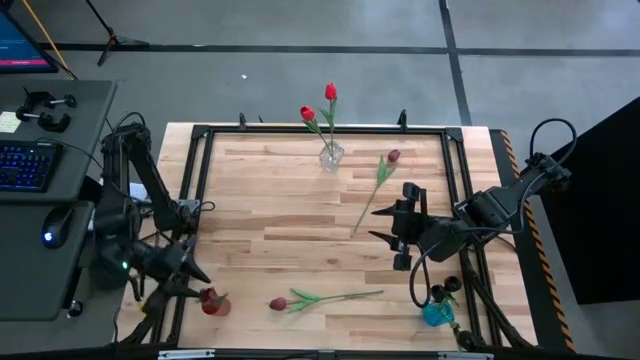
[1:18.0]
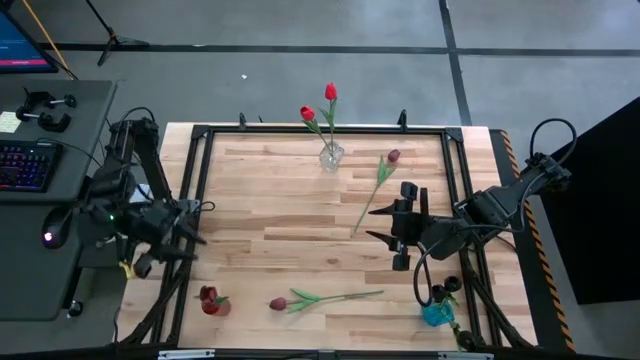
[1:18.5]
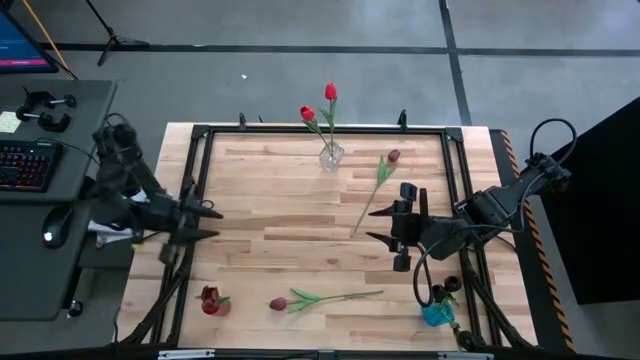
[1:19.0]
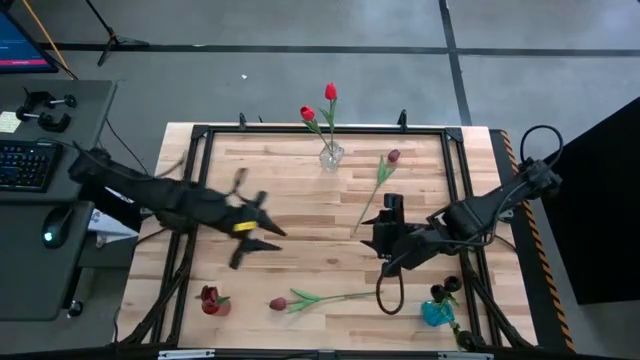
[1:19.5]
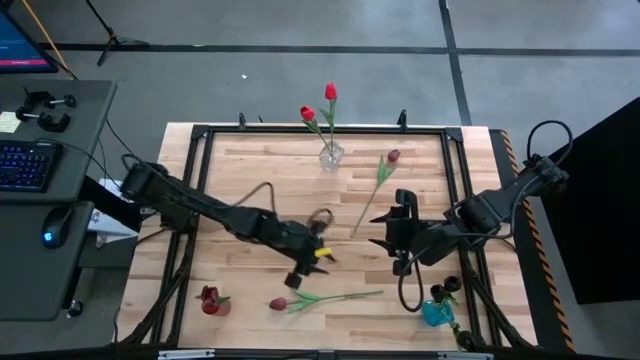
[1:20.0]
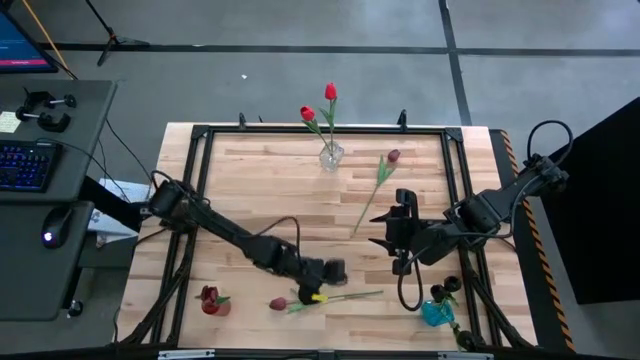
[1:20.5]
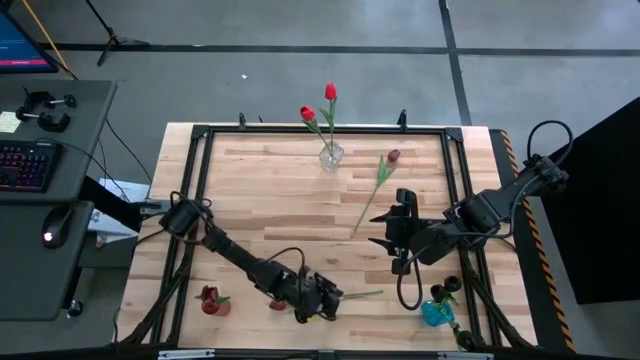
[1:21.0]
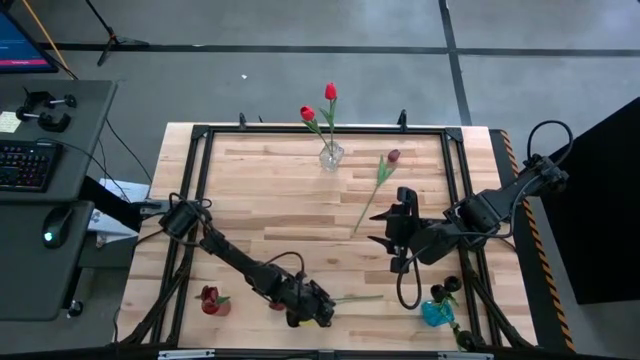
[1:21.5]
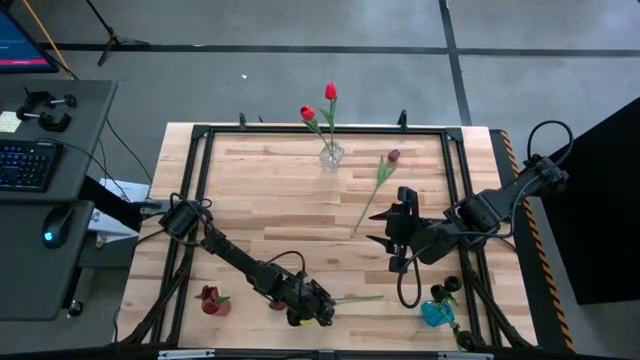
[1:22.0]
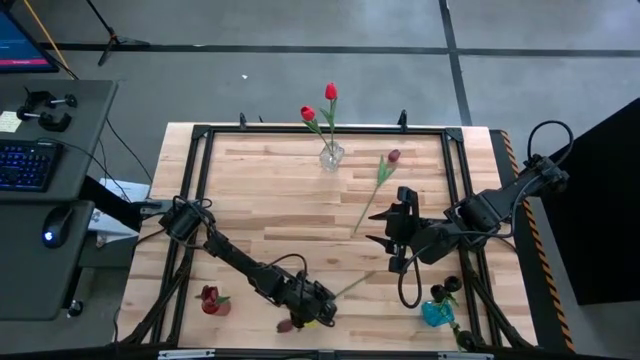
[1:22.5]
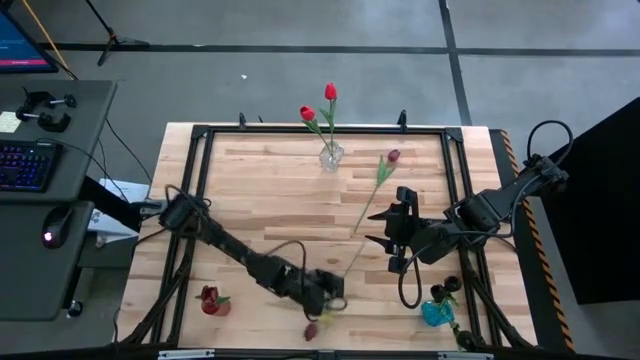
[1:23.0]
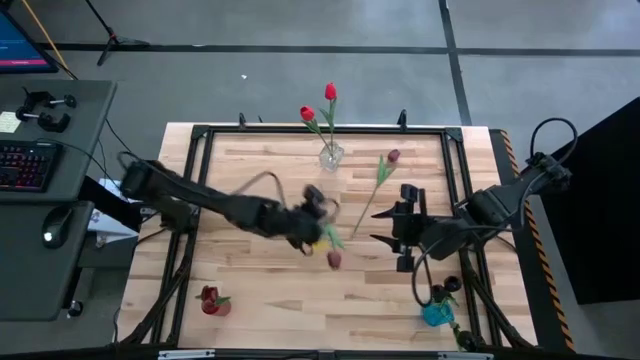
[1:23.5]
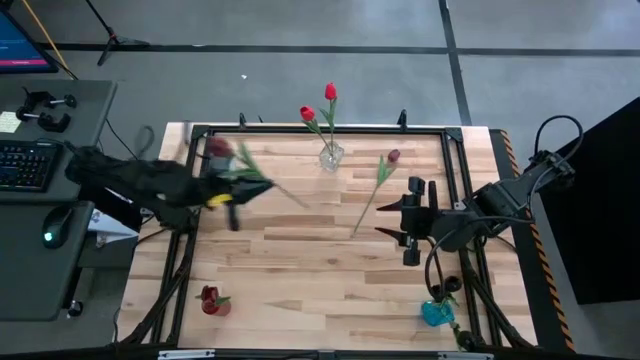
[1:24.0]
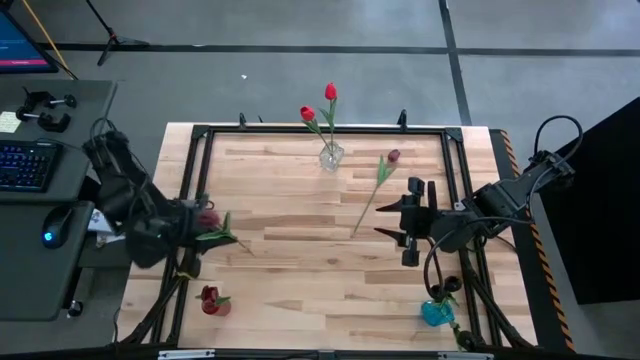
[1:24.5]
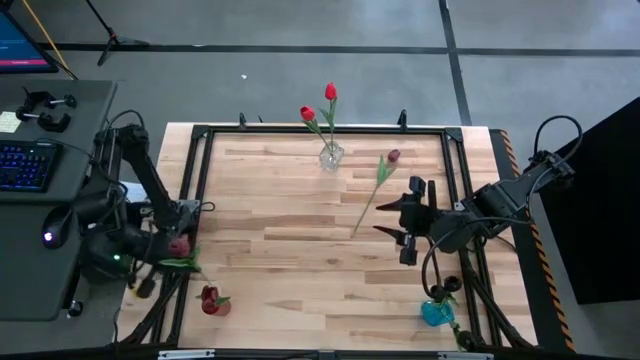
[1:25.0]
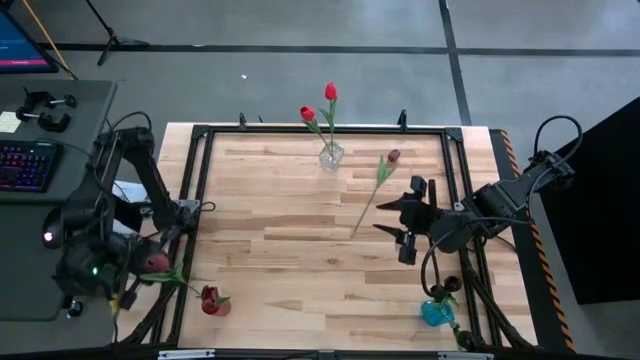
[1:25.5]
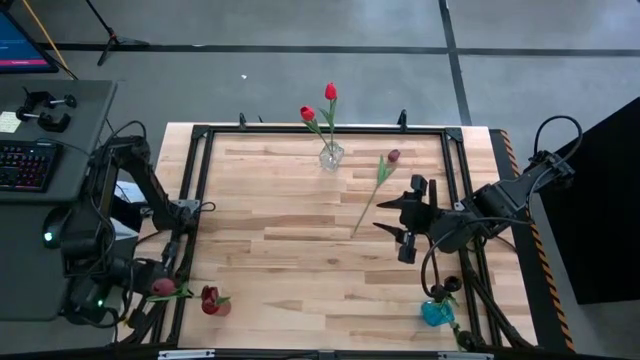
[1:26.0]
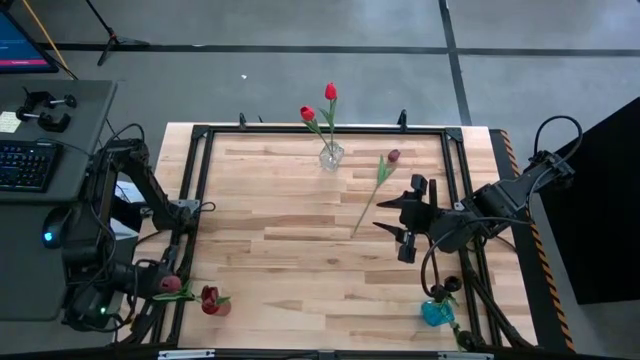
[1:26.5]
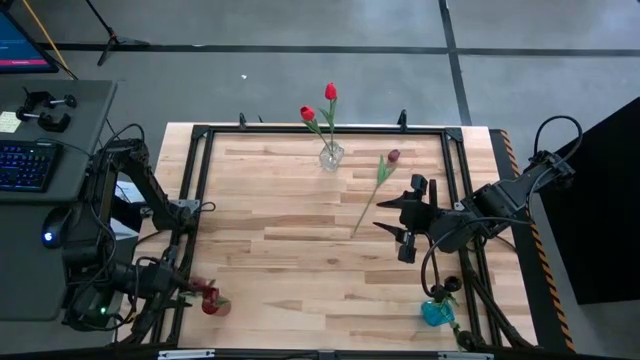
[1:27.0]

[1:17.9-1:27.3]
Task: Sort flowers into vase by color
Put the bottom maroon flower into the red vase

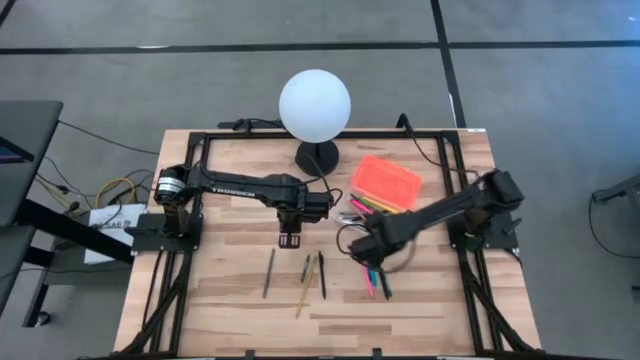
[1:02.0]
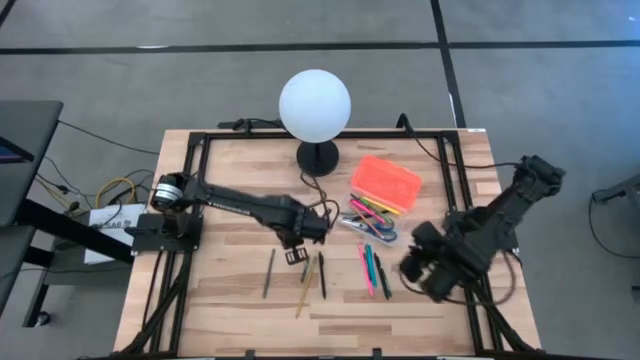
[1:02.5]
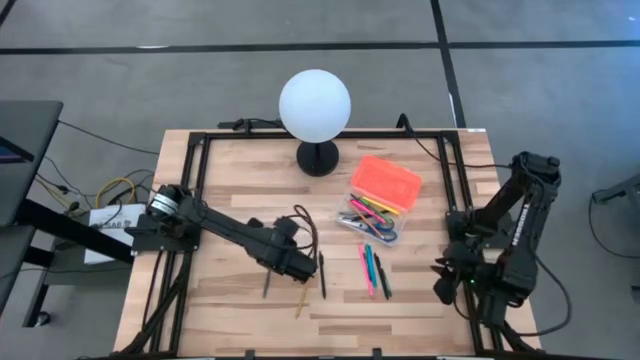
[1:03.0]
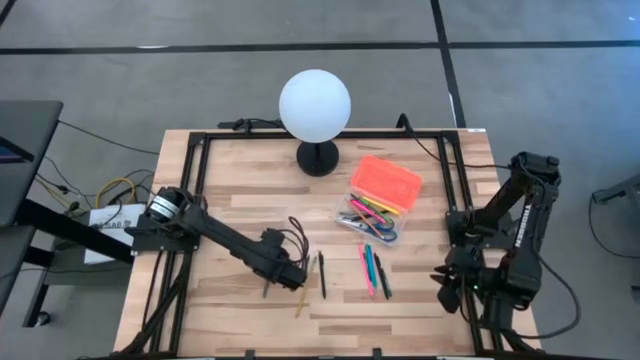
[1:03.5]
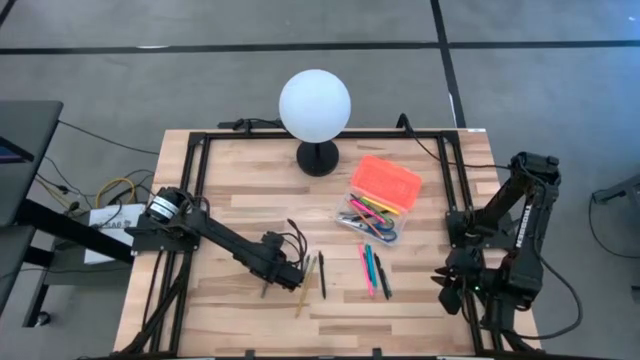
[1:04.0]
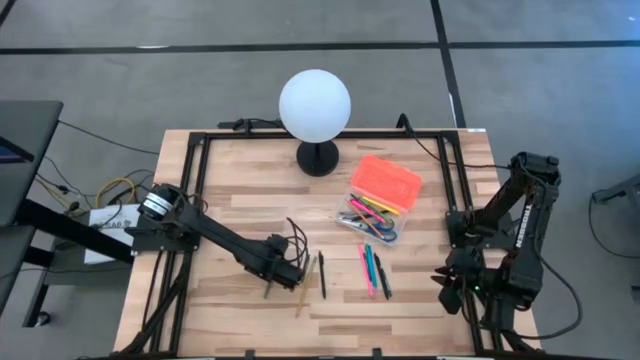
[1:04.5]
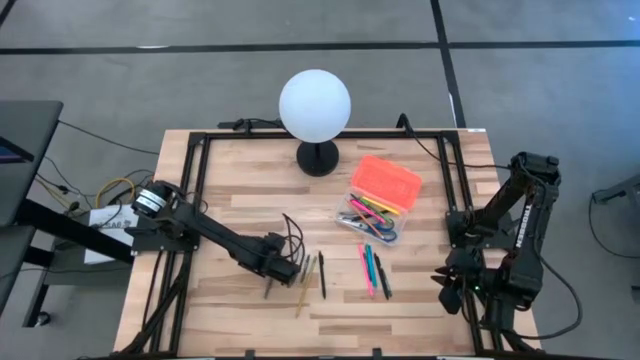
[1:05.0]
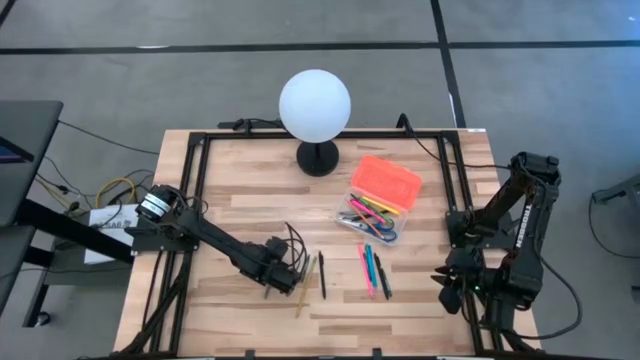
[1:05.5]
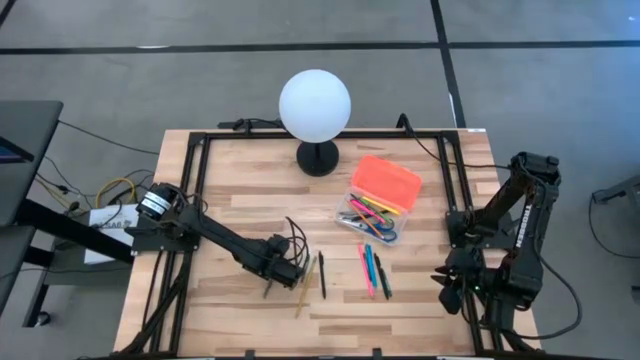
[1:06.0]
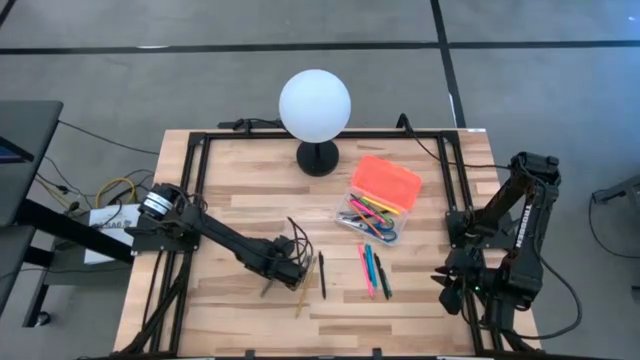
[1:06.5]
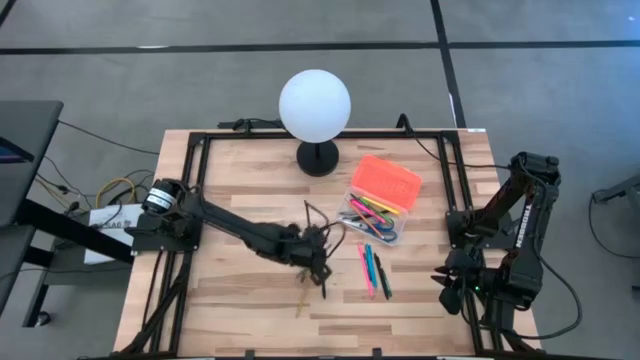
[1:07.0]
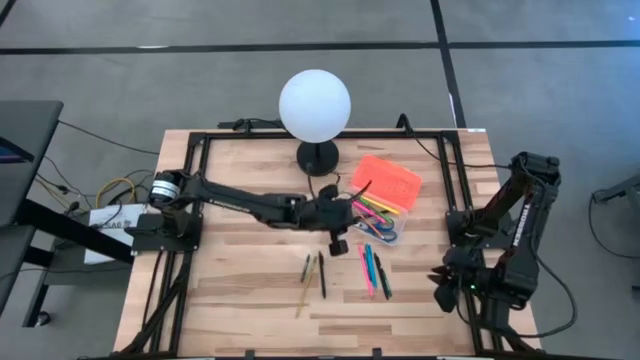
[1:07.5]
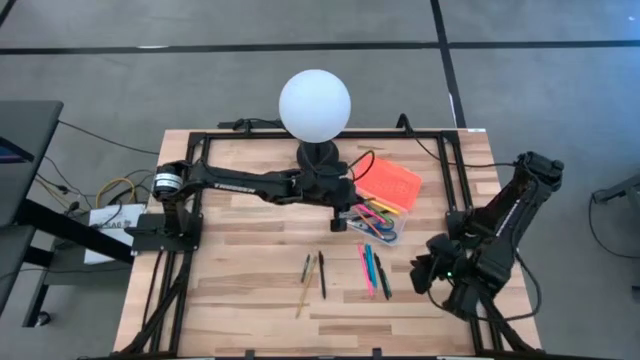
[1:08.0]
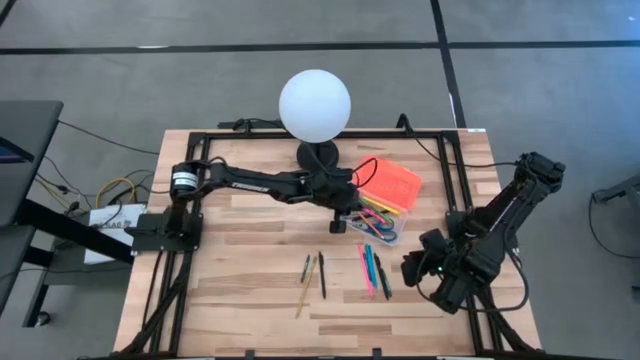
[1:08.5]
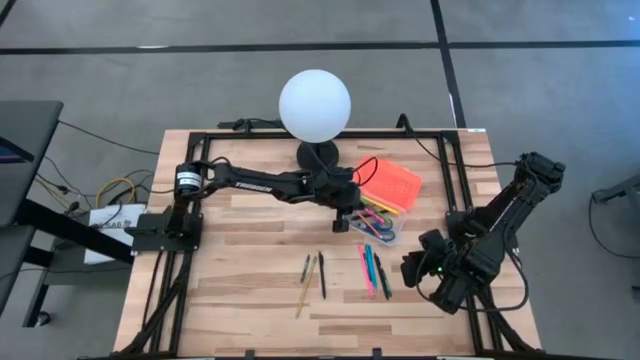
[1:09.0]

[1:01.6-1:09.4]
Task: Pick & place school supplies into a supply box
Put the gray pen into the orange supply box

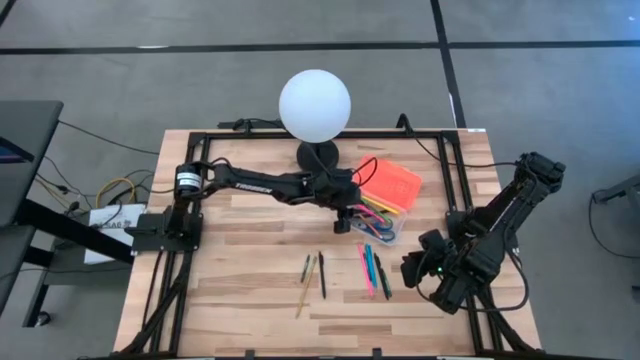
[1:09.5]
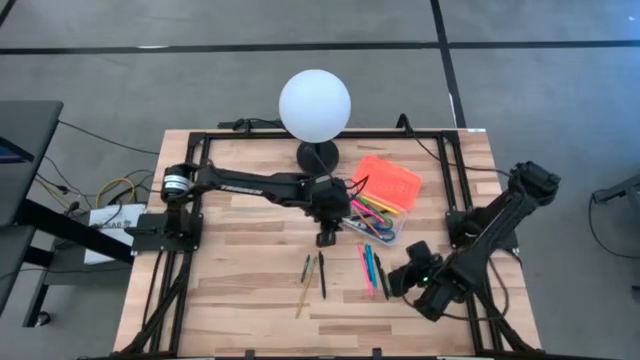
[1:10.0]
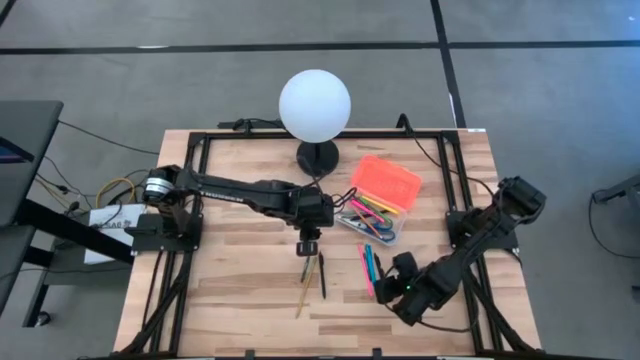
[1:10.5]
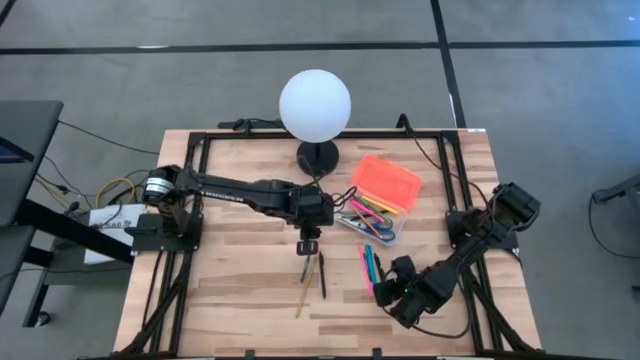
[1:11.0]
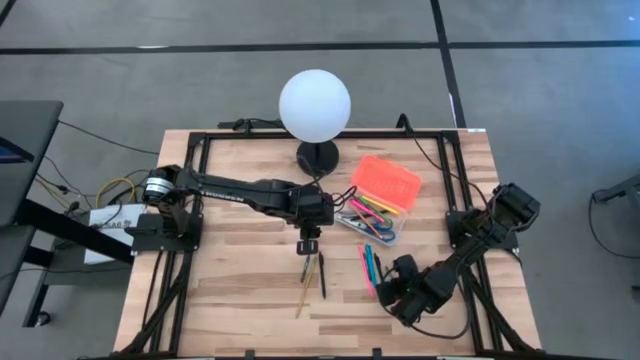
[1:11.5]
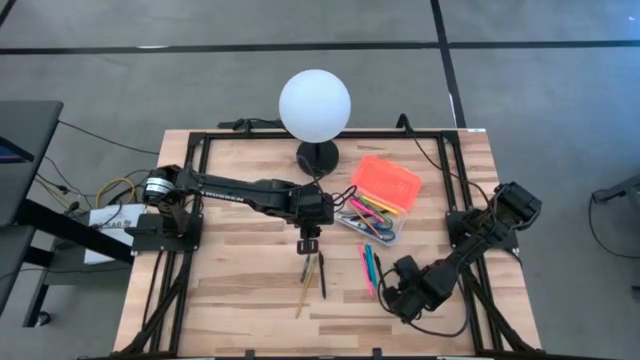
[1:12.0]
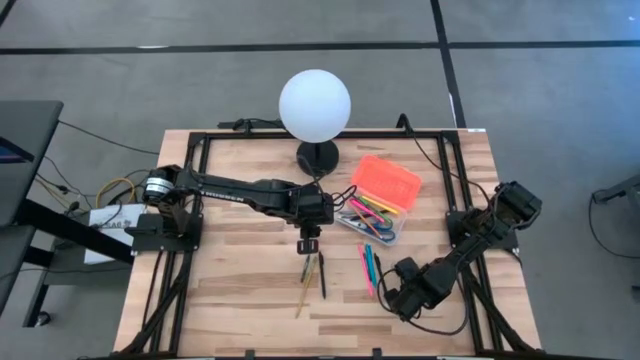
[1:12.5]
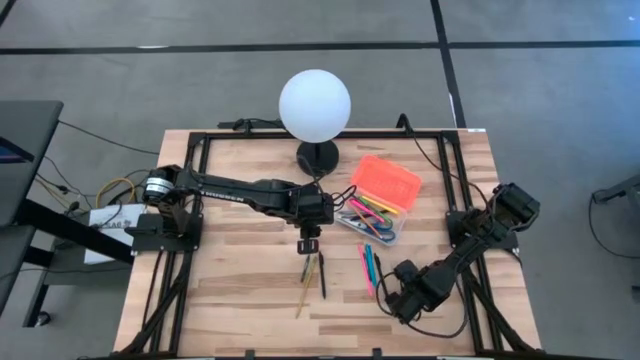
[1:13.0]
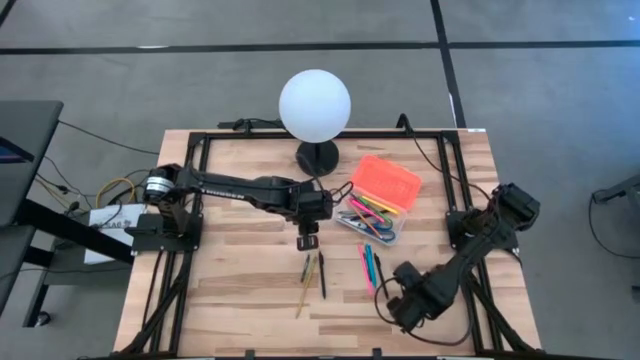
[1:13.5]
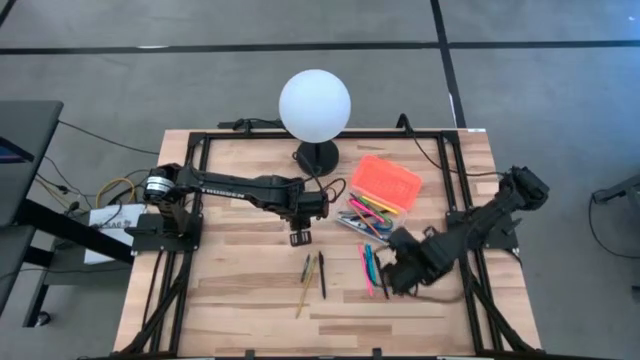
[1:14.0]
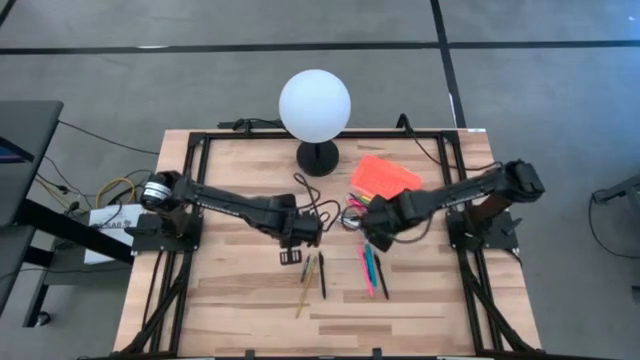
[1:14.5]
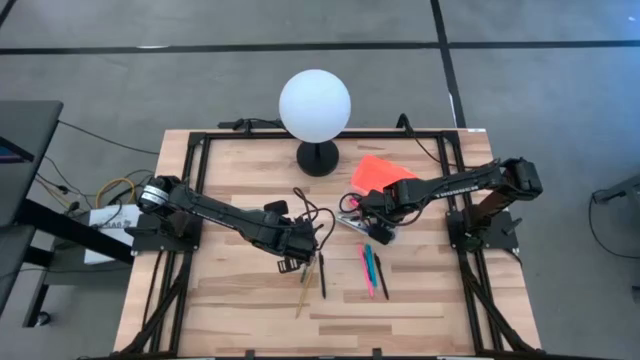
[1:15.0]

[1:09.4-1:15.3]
Put the green crayon into the orange supply box
